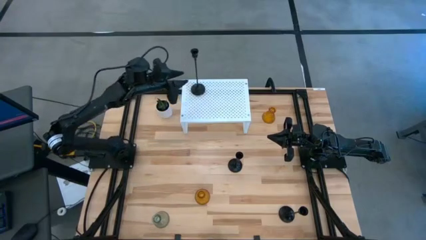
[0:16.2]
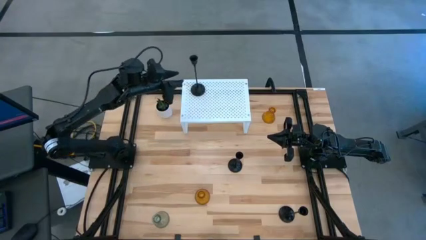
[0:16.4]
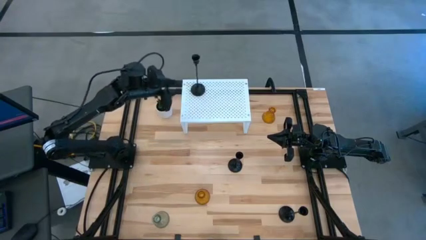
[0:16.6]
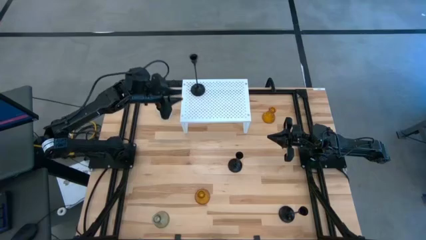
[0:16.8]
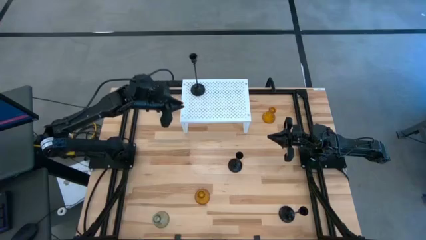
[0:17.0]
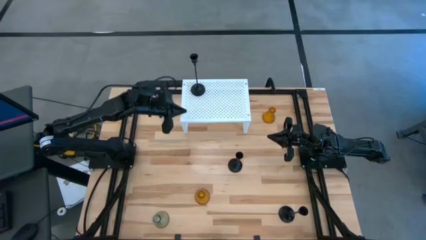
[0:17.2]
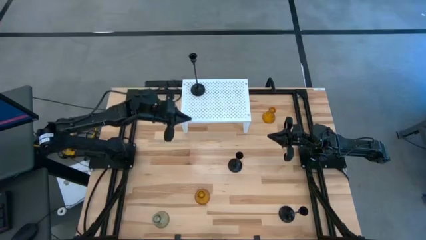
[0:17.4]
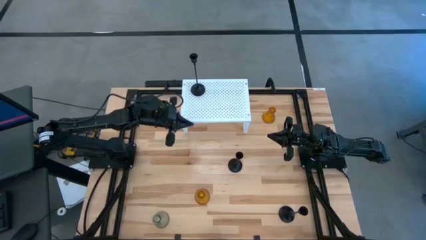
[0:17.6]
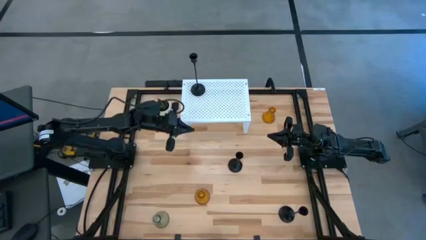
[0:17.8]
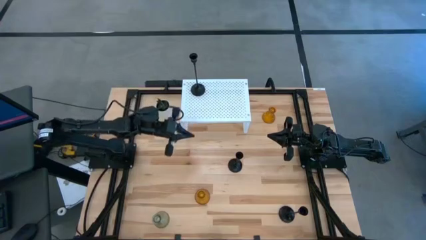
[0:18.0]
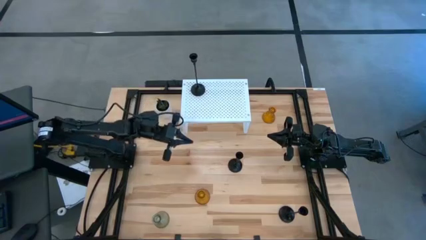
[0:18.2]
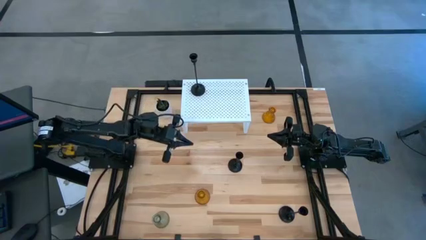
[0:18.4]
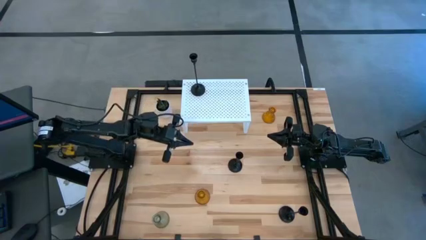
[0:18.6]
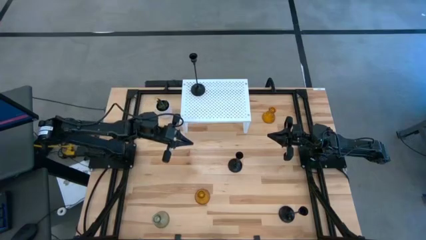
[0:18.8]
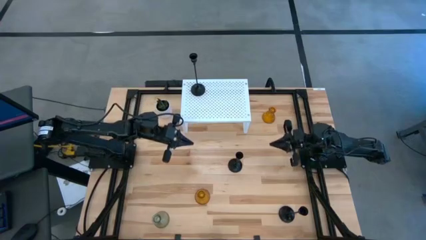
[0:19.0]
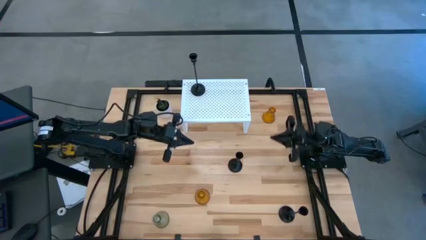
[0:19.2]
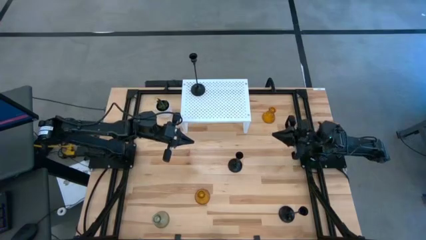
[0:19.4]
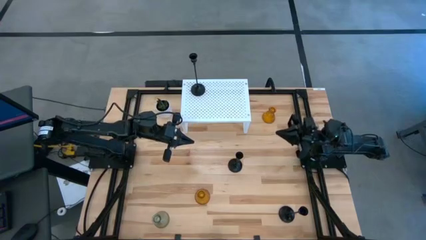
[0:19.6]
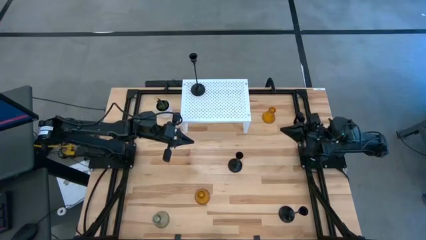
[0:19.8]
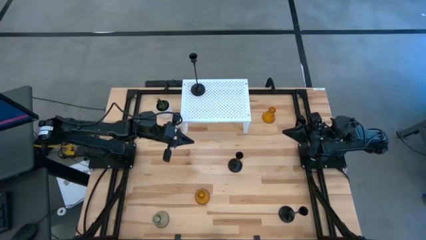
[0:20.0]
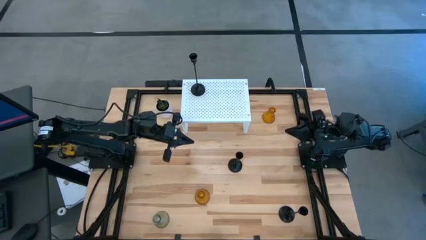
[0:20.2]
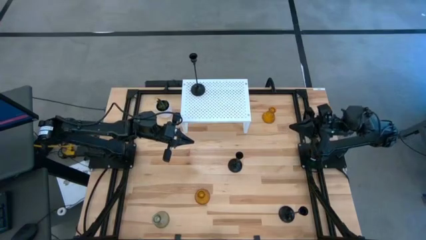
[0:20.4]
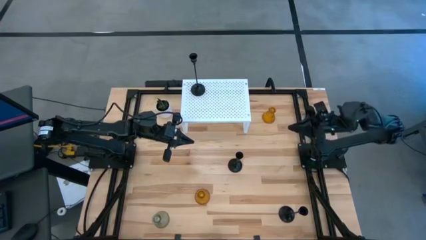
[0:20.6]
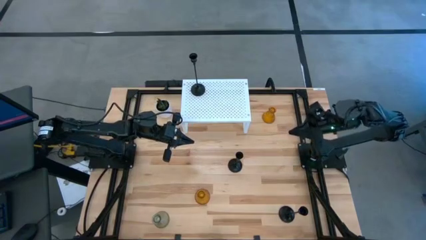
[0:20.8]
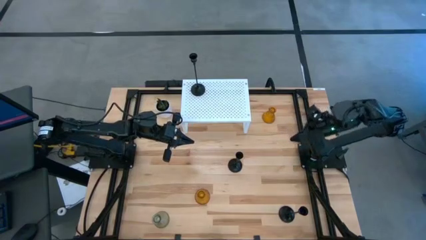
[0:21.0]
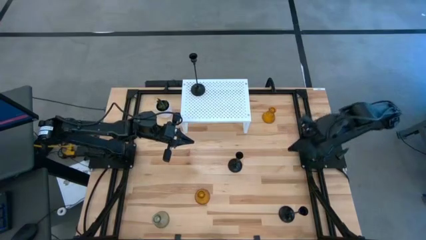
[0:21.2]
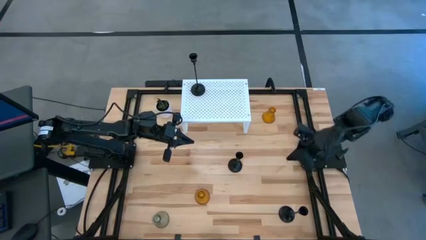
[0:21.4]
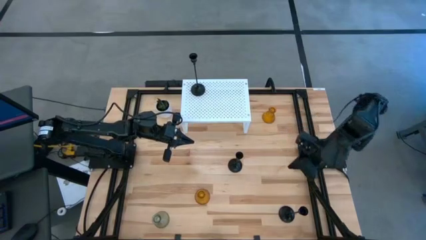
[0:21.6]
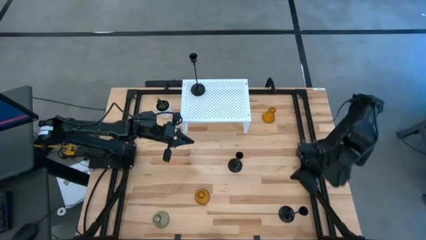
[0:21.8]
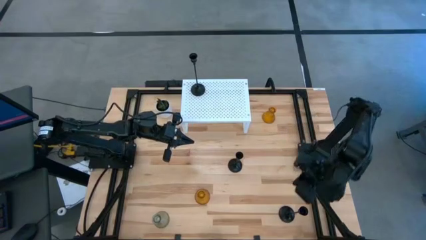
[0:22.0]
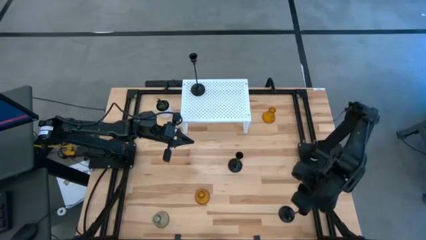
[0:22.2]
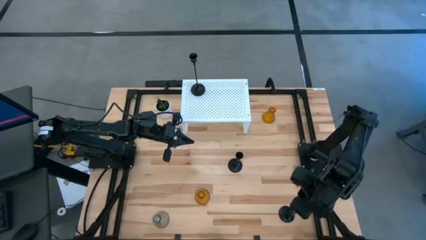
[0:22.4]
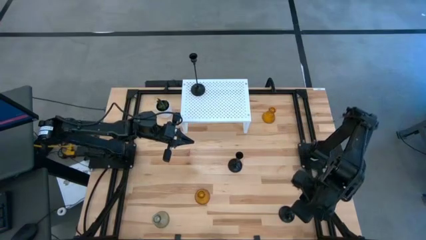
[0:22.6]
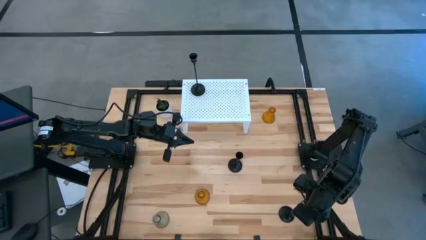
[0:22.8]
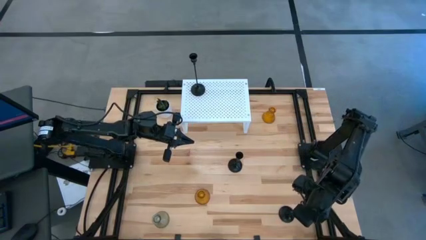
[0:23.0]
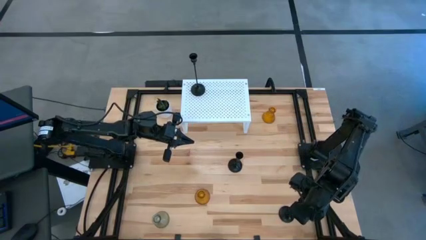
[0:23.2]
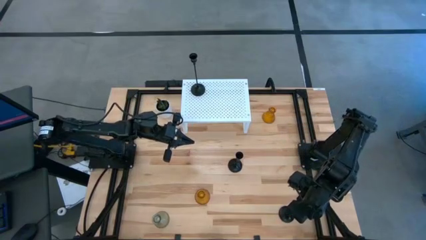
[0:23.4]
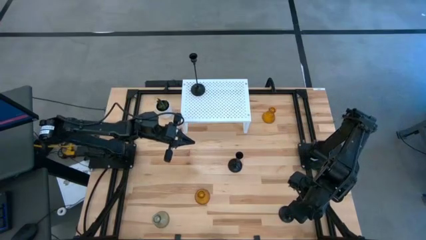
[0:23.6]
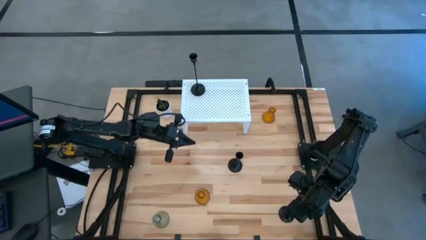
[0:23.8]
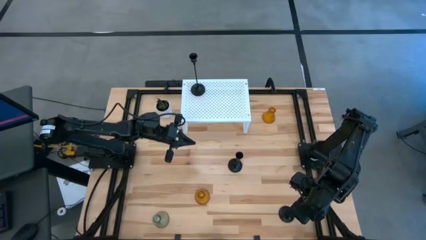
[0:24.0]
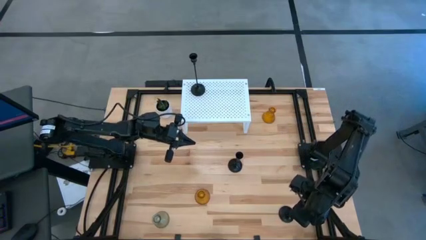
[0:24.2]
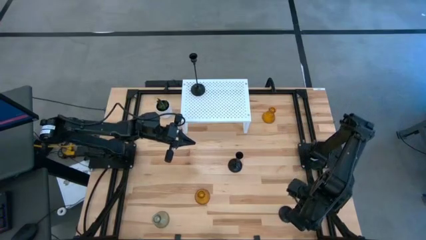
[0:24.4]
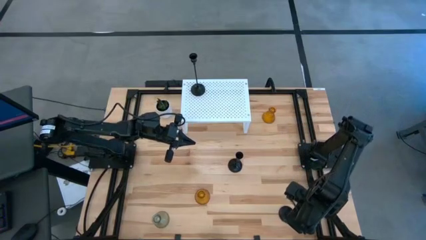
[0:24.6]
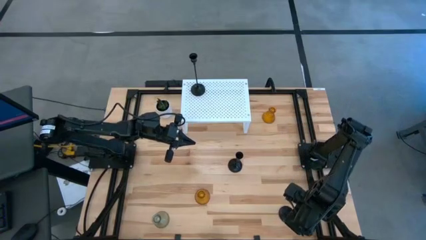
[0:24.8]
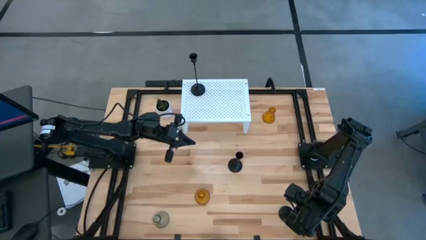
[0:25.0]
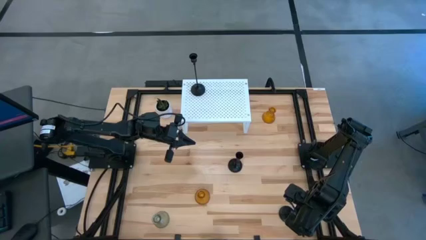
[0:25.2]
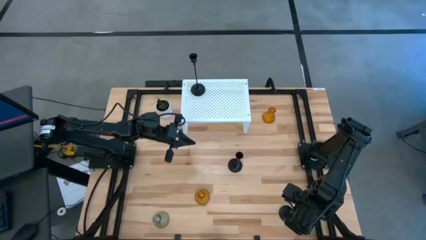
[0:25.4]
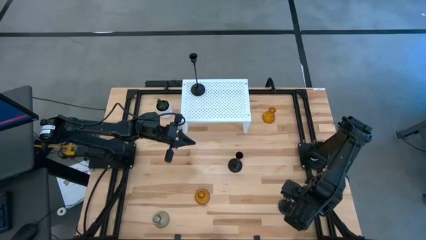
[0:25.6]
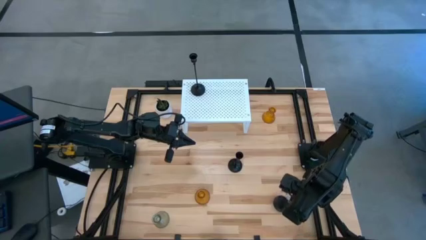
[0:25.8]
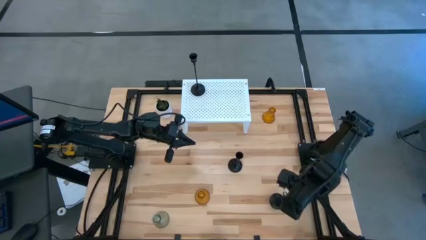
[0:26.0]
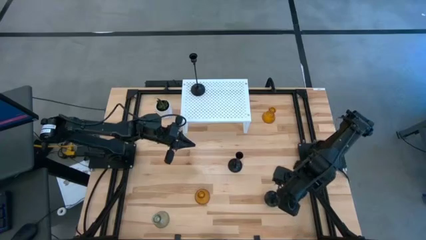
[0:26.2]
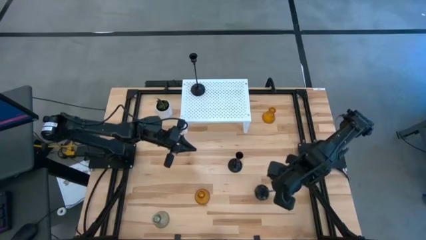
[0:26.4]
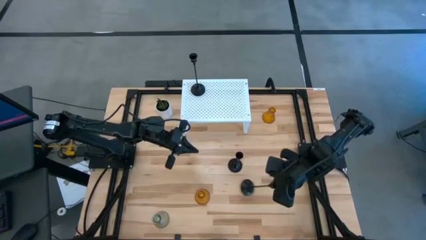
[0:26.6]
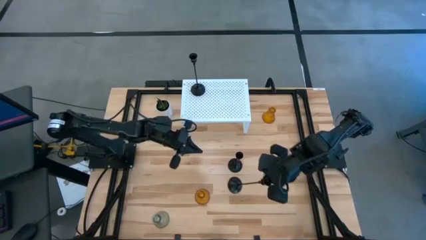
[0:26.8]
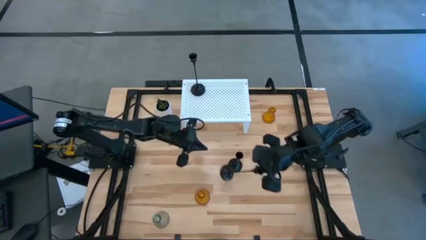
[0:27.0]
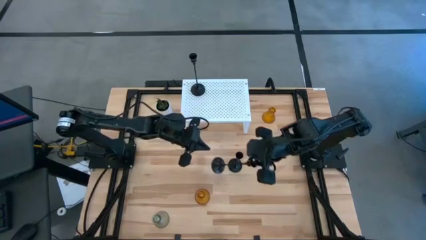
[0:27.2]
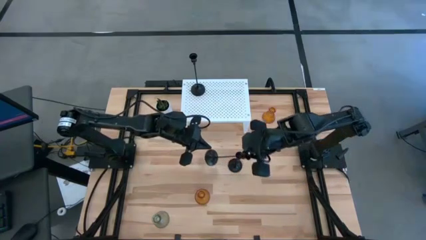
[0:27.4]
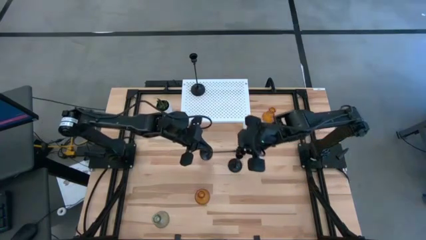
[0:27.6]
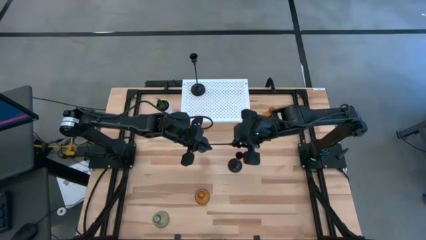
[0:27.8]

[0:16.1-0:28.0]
Task: Pick & Place candle stick holders
Put the bottom black candle holder on the shelf aligned with the other black candle holder
